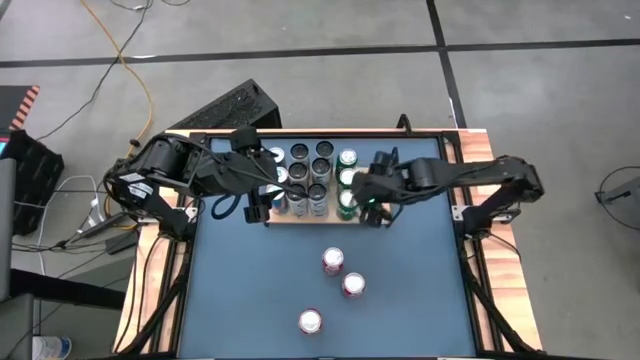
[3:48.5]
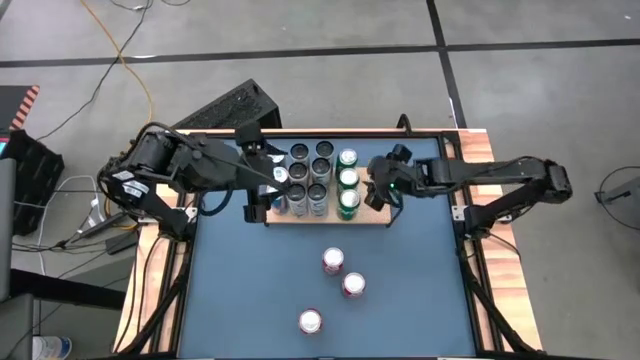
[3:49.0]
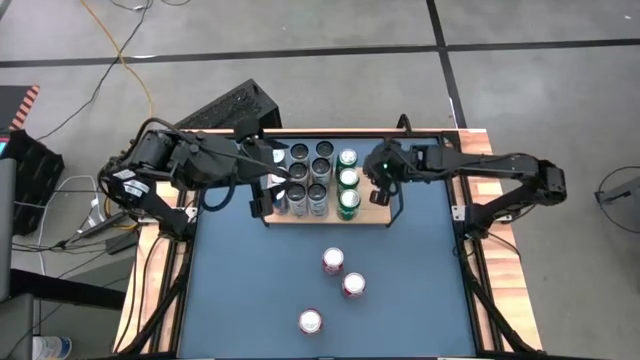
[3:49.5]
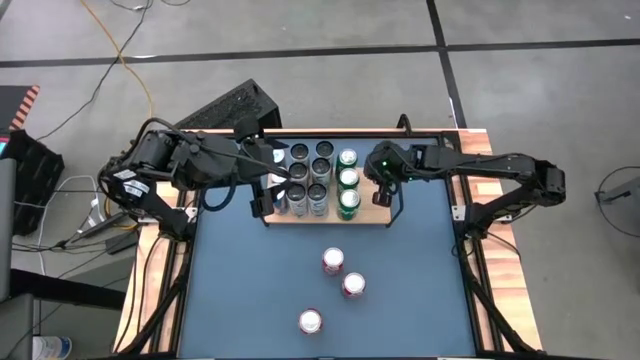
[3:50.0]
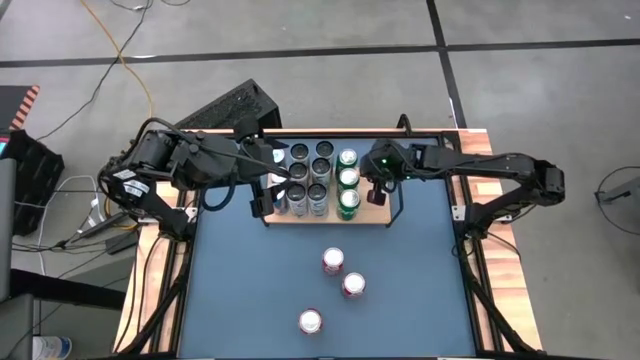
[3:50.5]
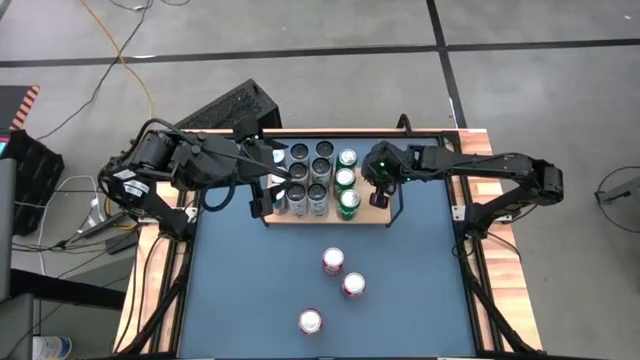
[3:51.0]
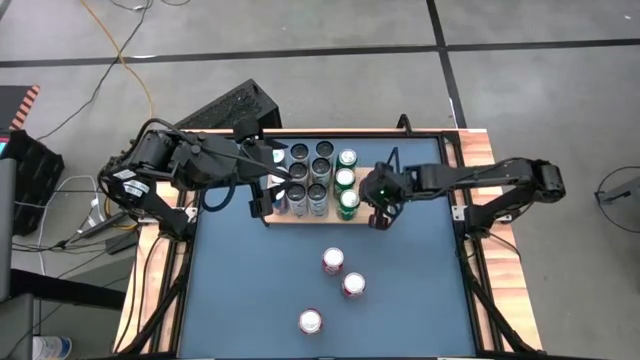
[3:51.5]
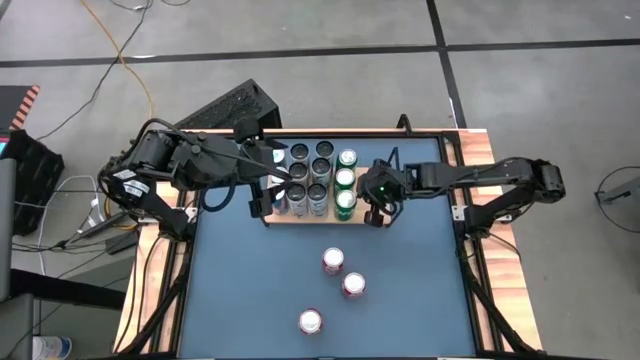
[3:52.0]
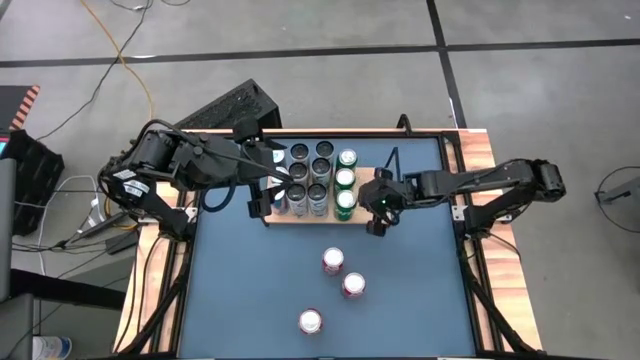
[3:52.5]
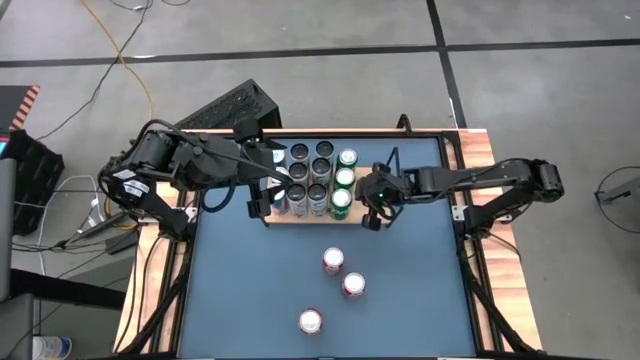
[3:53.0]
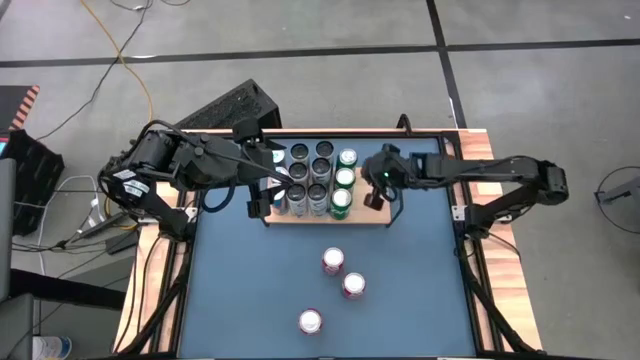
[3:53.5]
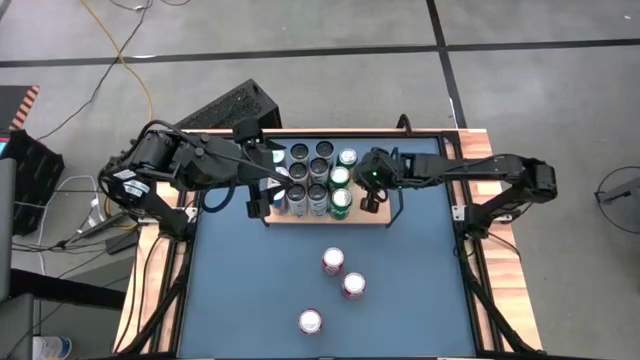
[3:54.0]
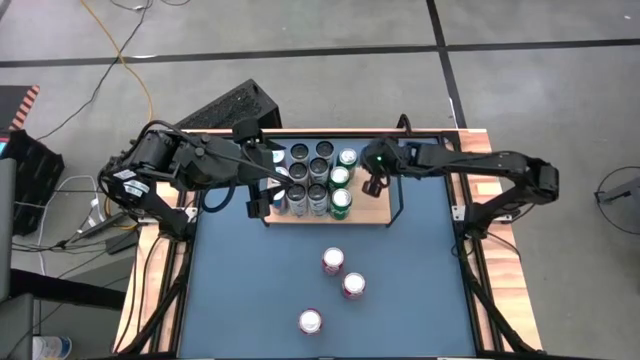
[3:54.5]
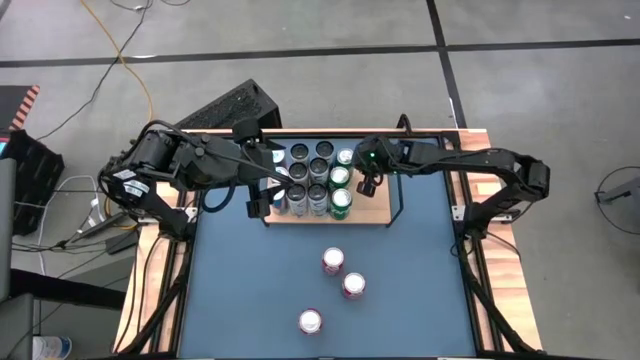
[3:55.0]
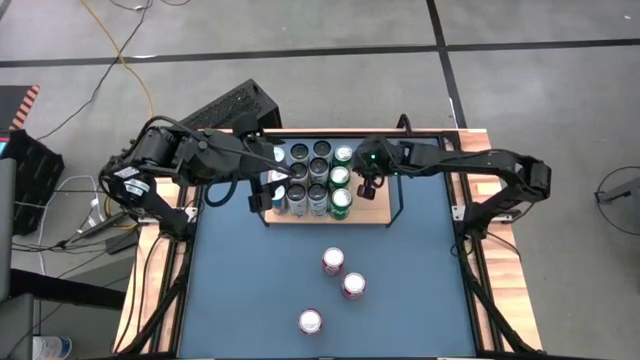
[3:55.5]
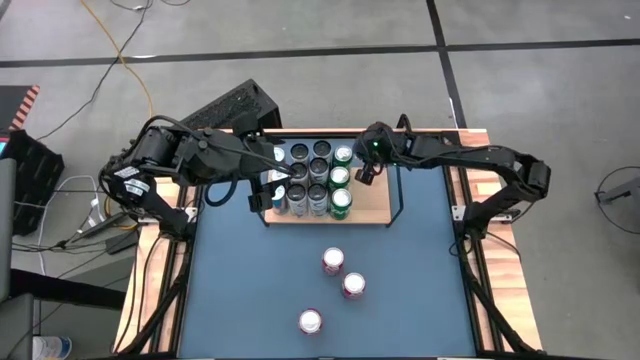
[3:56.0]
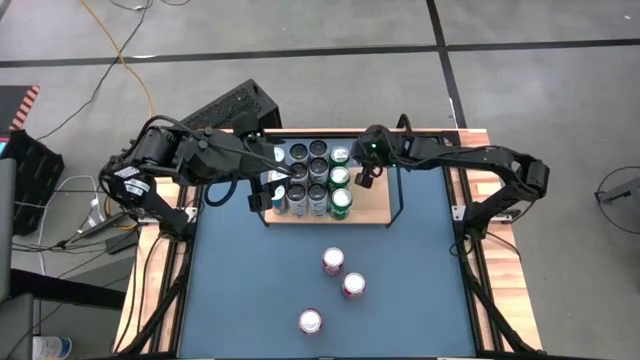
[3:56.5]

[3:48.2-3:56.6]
Task: Place canned beverage on shelf
Adjust the green soda cans on the shelf

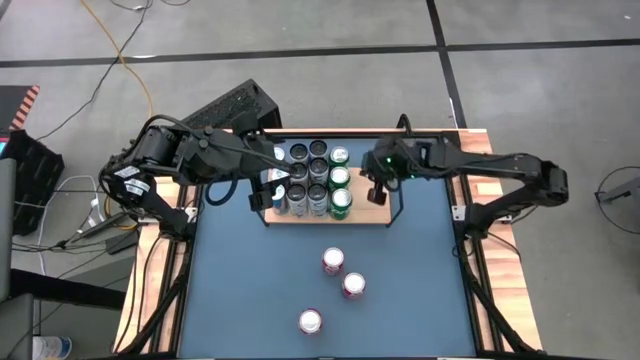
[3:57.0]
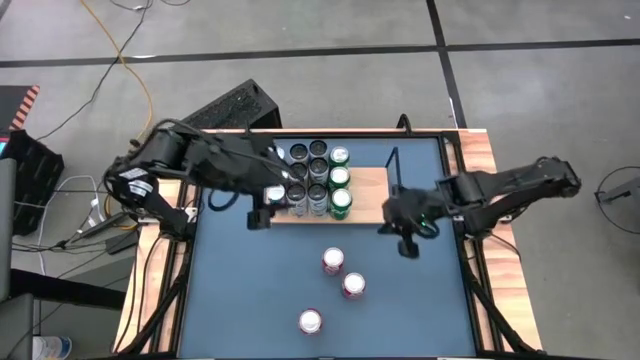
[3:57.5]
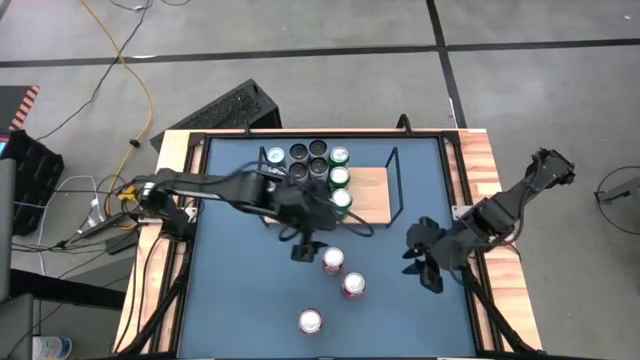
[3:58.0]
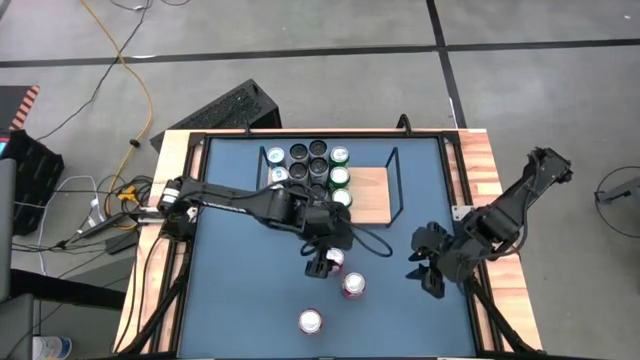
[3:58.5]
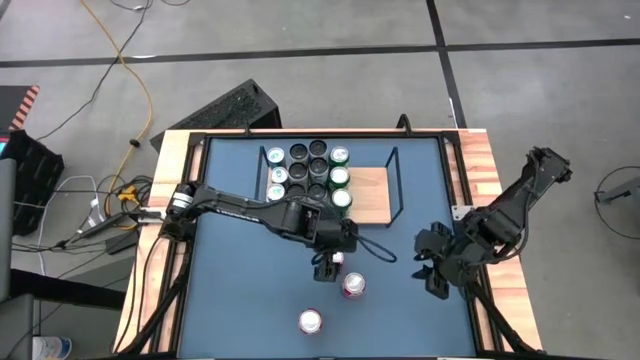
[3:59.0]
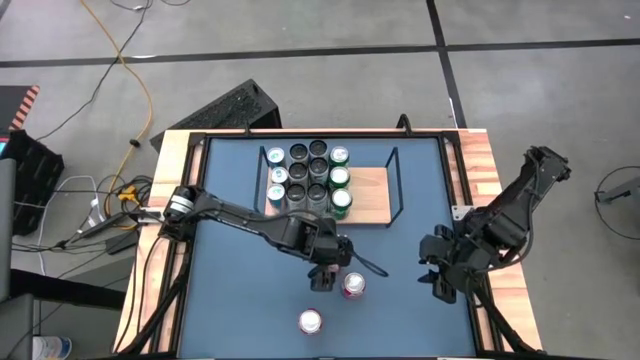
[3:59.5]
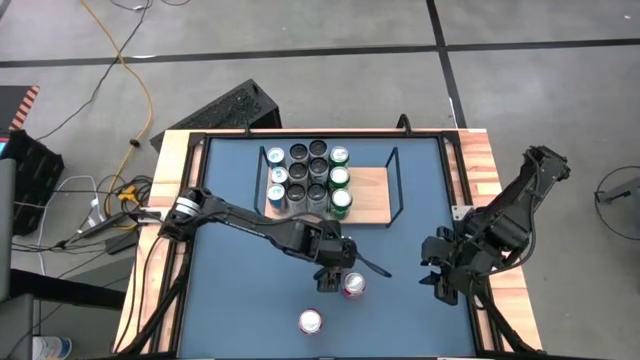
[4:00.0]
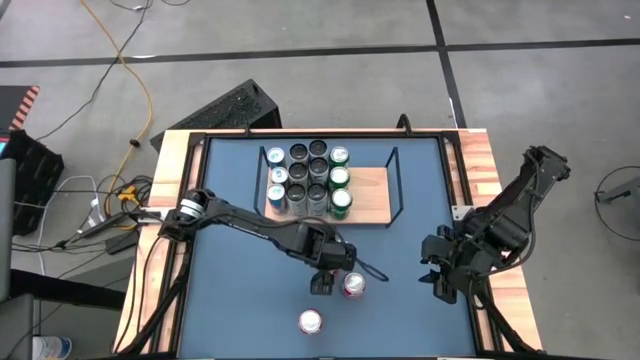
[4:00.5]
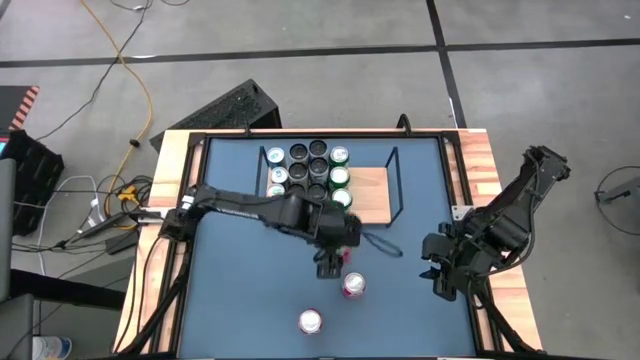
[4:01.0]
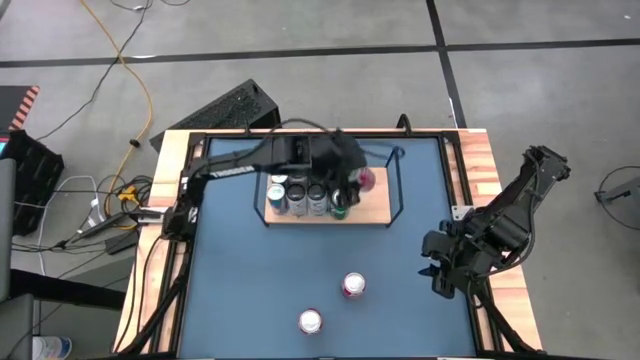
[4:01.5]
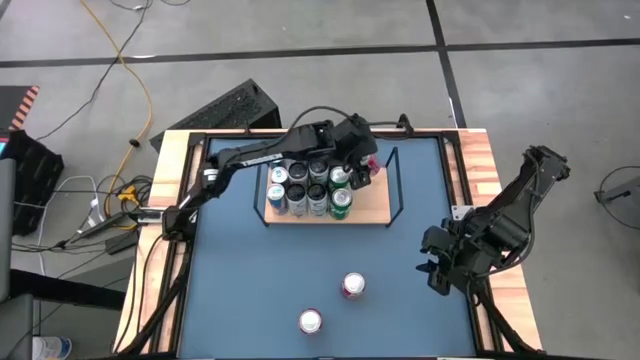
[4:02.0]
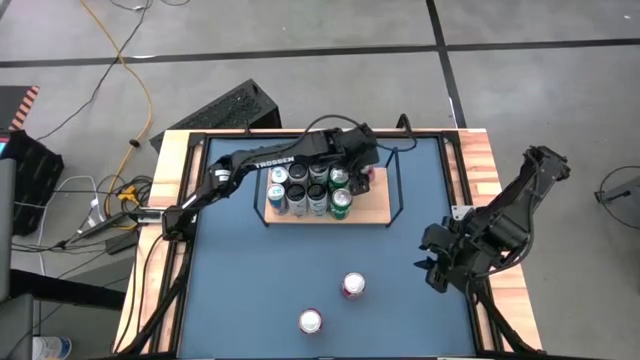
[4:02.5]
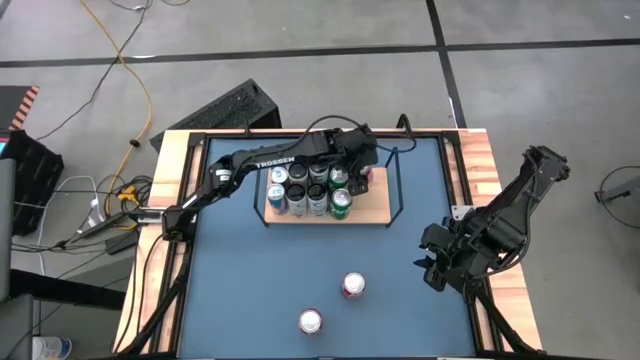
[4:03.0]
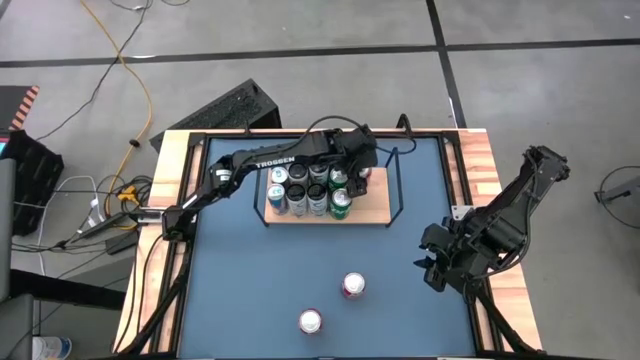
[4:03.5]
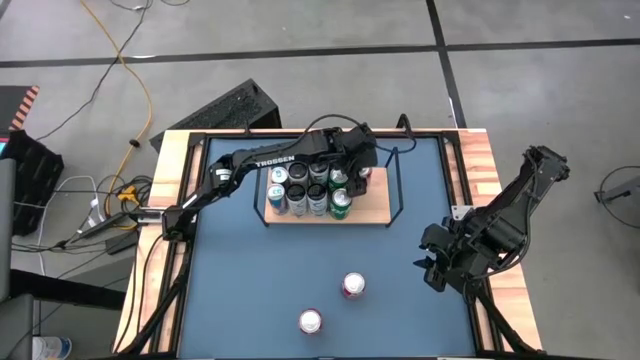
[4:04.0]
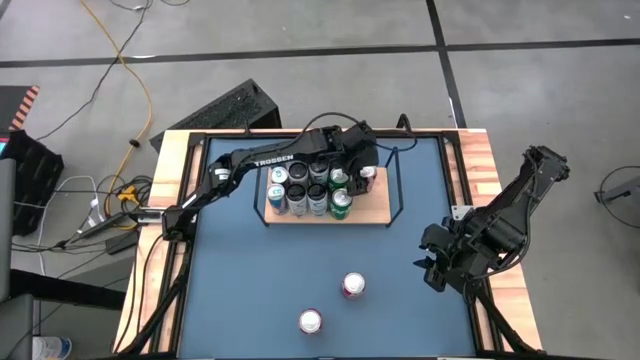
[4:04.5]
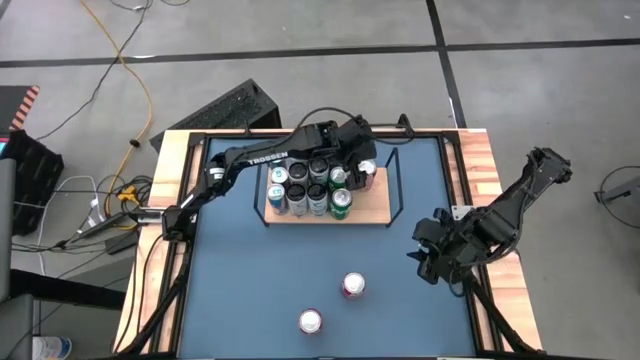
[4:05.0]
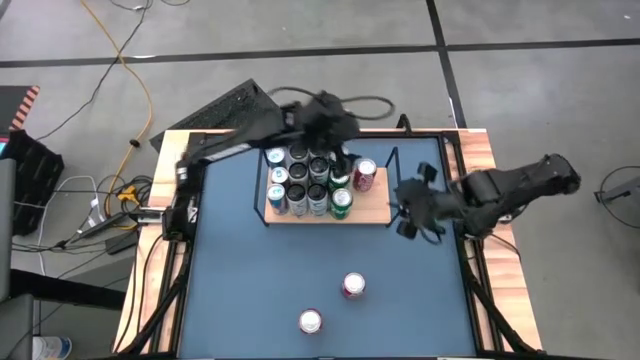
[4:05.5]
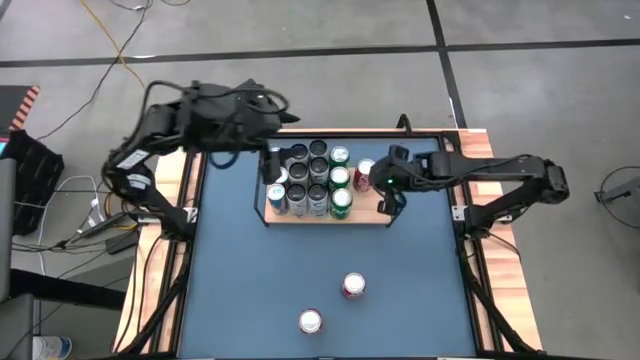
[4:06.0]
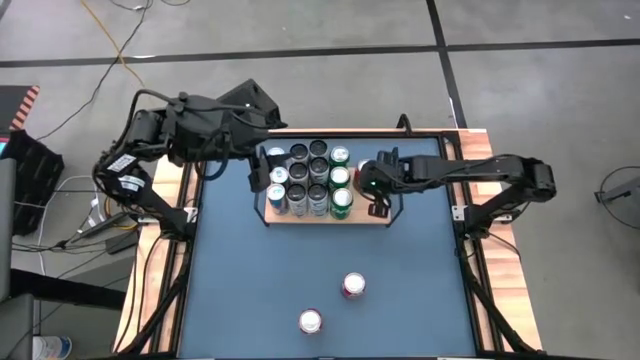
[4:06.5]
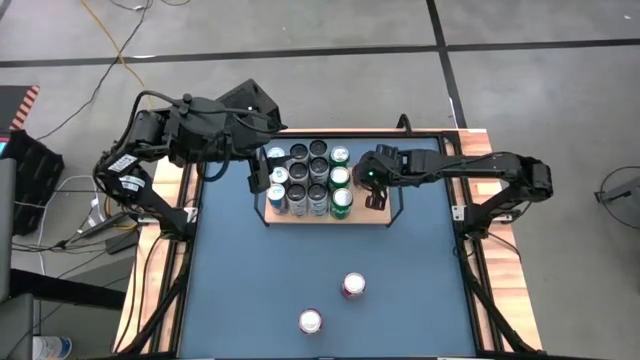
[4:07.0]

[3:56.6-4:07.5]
Put the top red soda can on the shelf
